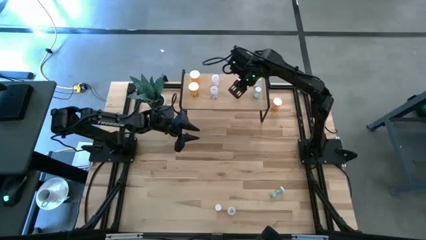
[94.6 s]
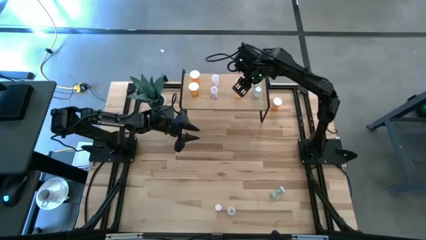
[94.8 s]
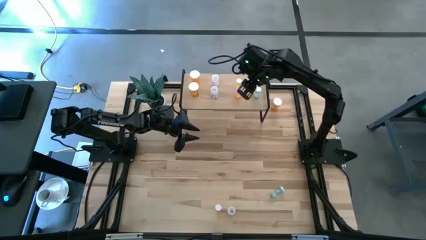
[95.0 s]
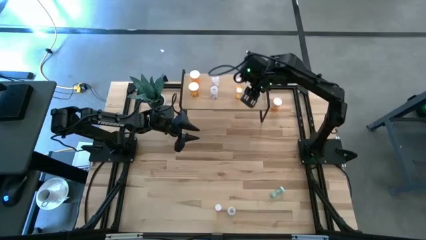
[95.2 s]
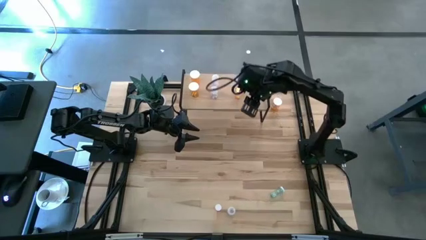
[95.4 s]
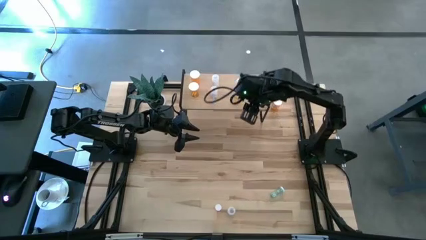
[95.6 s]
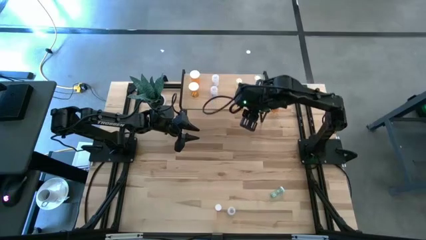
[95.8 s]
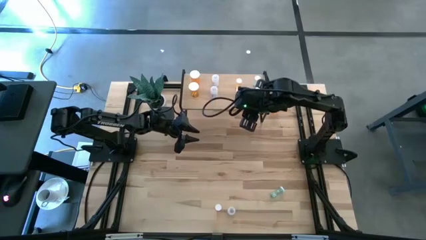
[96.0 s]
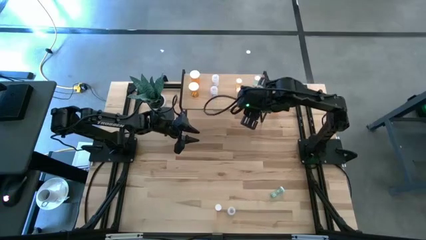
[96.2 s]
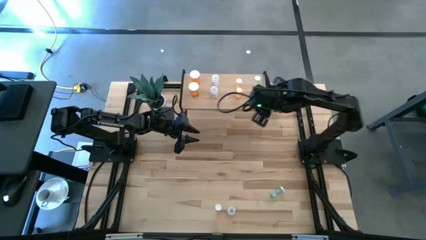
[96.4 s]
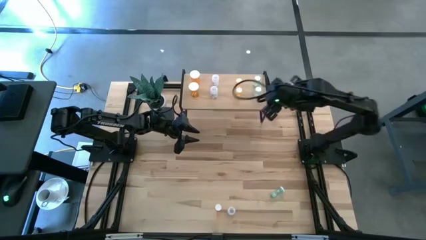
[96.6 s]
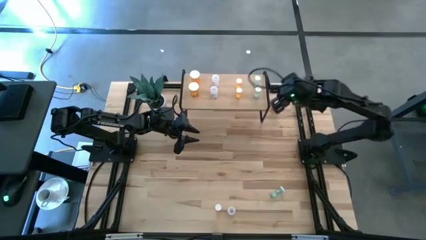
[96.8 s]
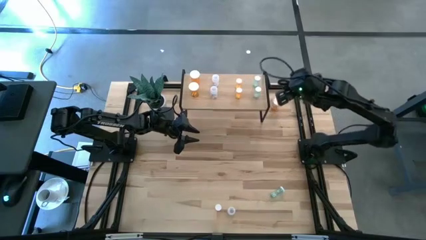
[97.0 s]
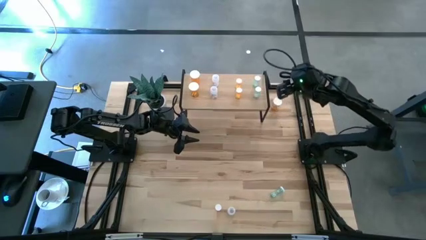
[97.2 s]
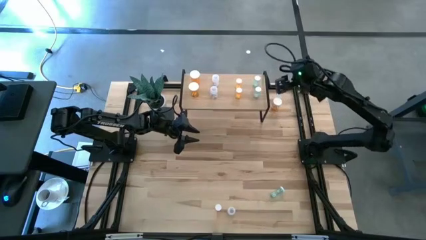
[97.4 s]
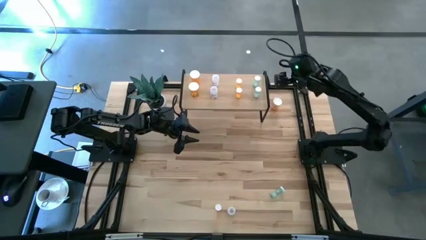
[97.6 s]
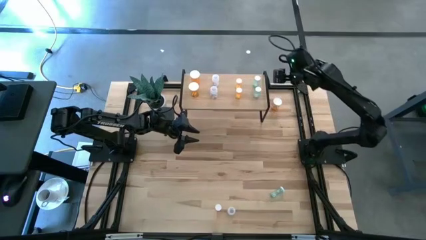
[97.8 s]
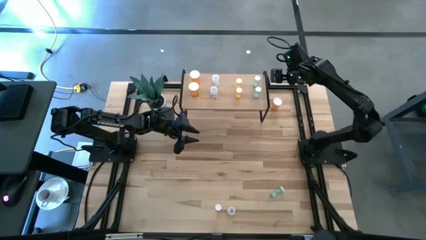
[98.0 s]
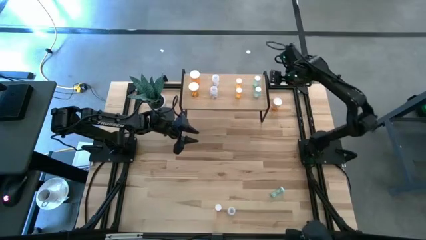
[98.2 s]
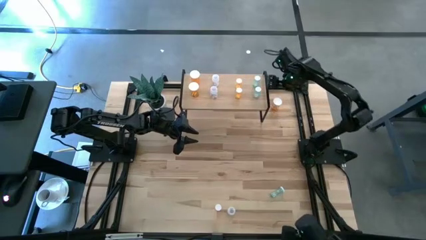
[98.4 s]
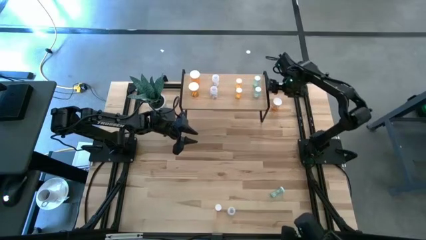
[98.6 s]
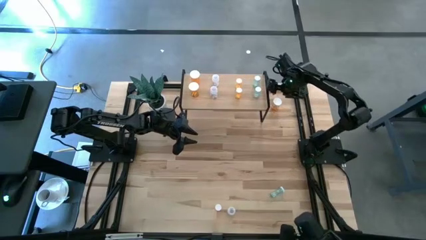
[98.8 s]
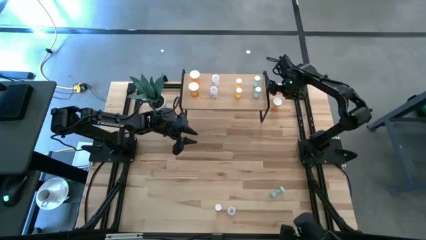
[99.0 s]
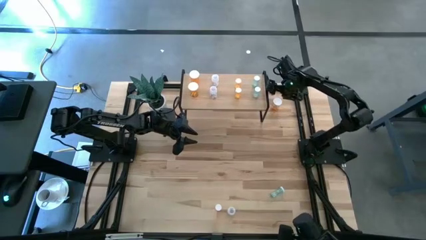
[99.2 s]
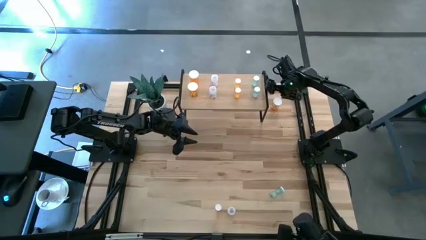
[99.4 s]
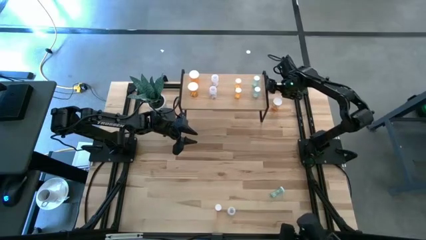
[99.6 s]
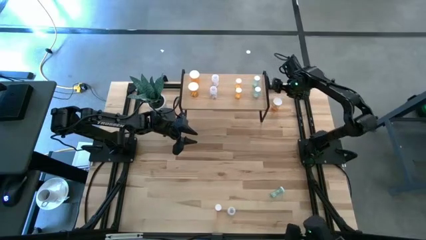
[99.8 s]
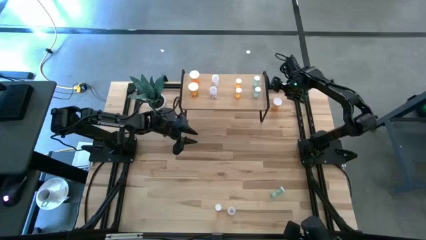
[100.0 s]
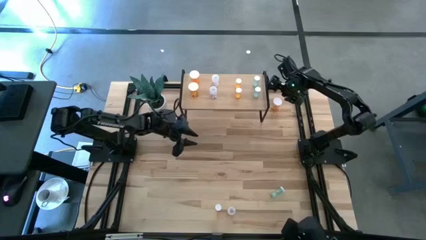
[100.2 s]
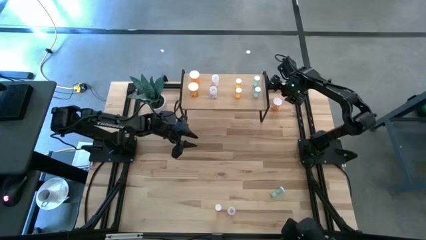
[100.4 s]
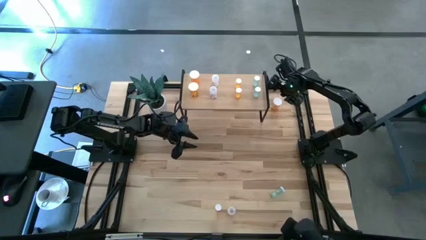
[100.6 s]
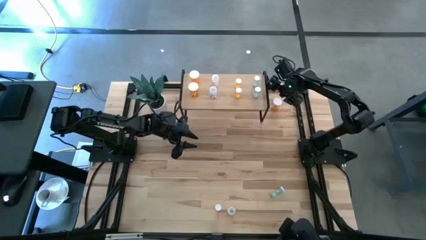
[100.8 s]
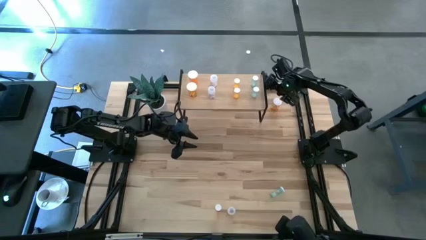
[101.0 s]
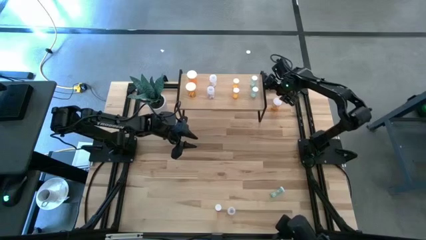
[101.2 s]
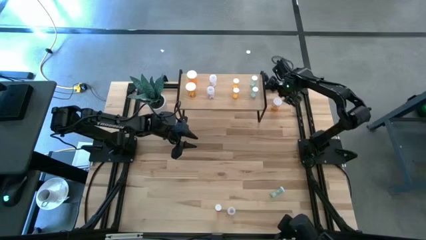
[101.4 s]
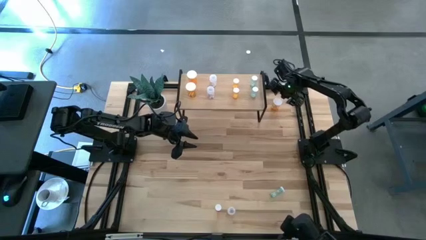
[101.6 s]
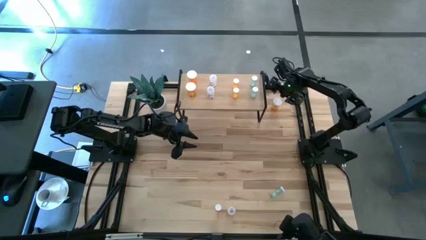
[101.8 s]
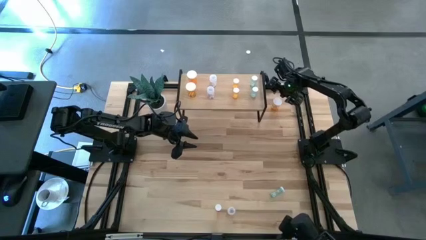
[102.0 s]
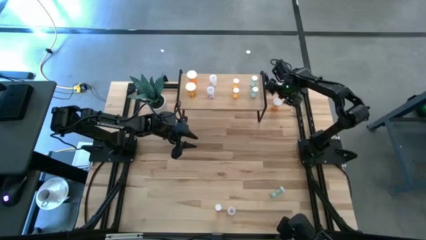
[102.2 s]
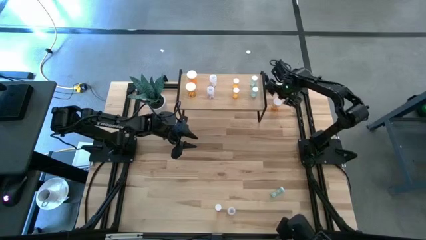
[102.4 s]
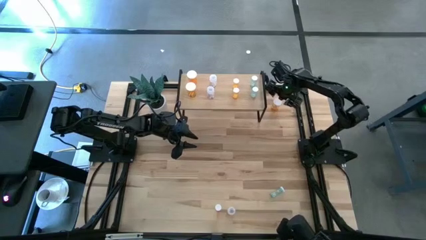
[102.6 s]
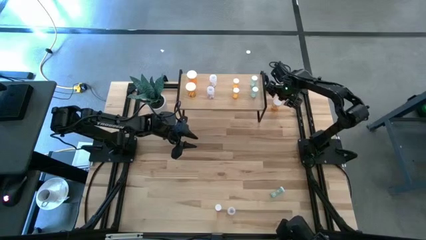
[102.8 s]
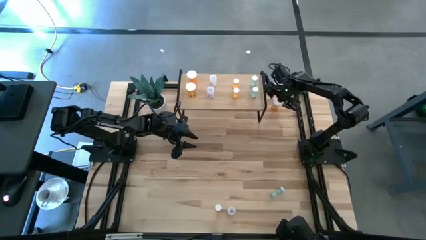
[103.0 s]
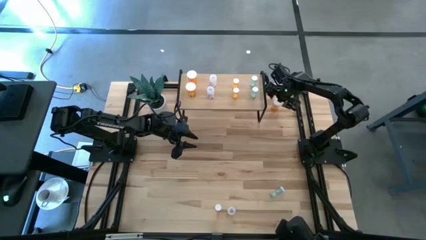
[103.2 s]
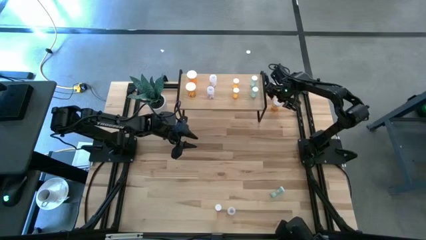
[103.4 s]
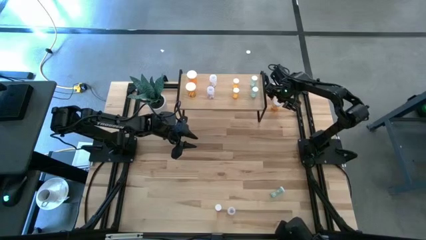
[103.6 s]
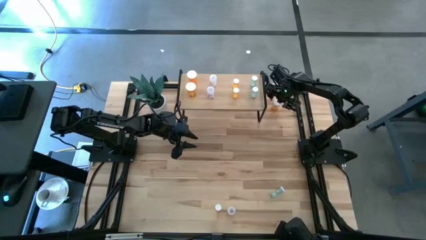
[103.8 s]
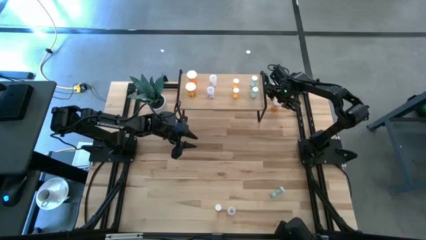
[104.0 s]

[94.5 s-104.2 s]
Task: Pick and place medicine bottles onto shelf by color
Put the large orange pill bottle aligned with the other large orange pill bottles on the shelf

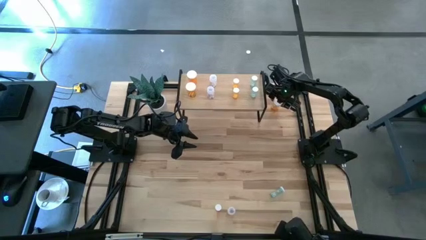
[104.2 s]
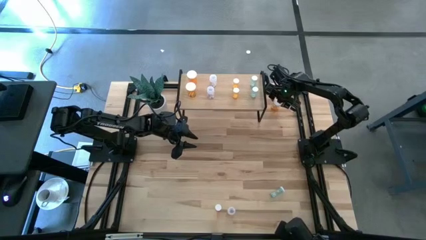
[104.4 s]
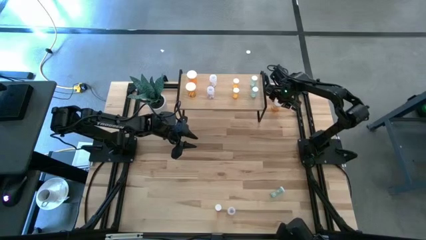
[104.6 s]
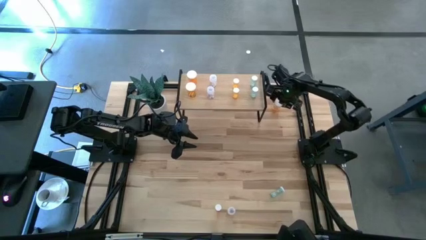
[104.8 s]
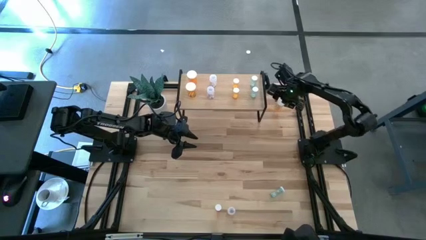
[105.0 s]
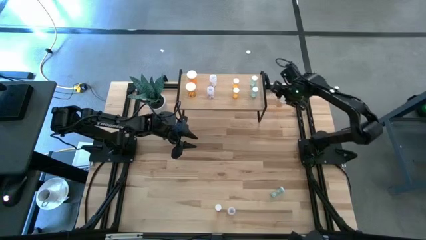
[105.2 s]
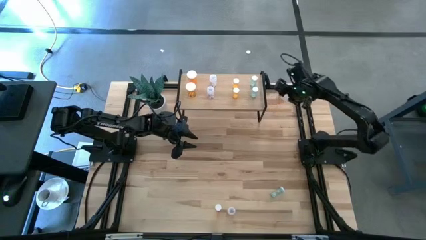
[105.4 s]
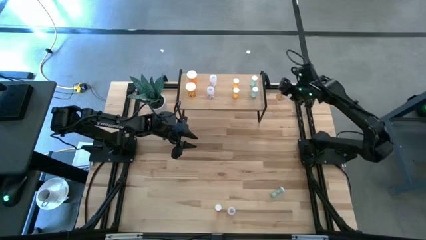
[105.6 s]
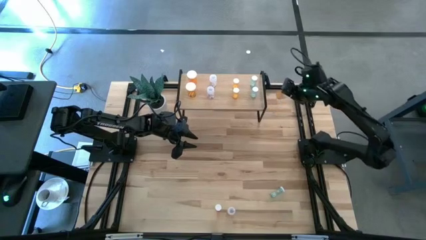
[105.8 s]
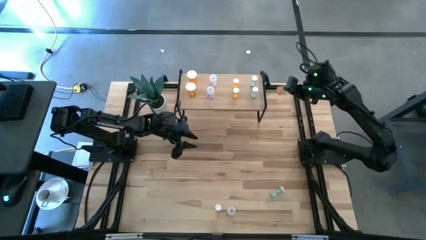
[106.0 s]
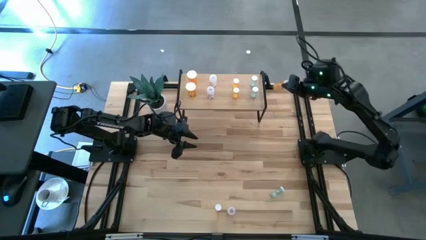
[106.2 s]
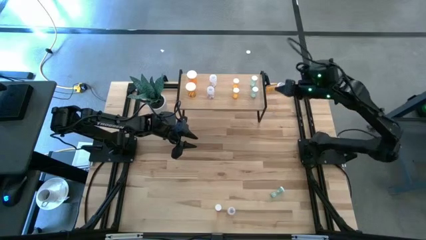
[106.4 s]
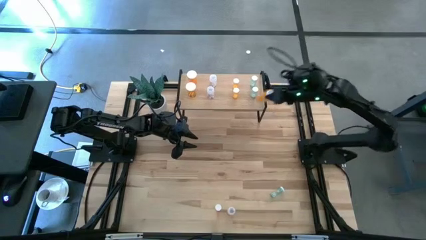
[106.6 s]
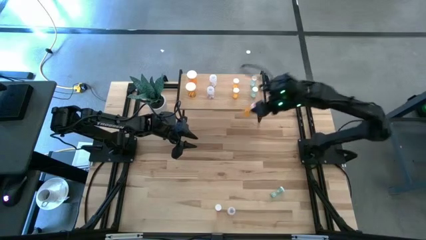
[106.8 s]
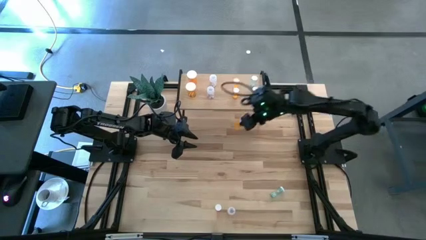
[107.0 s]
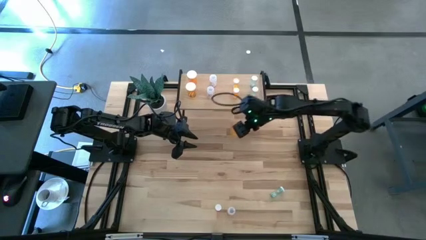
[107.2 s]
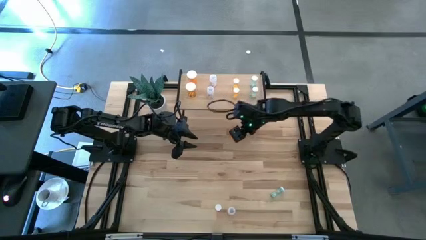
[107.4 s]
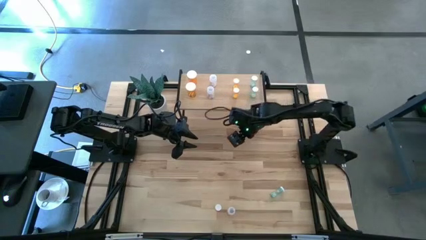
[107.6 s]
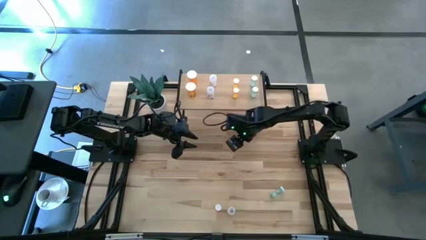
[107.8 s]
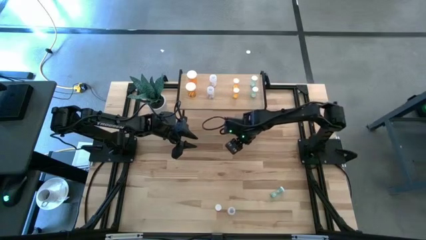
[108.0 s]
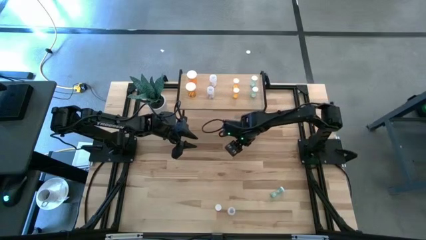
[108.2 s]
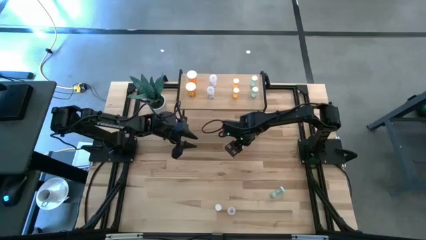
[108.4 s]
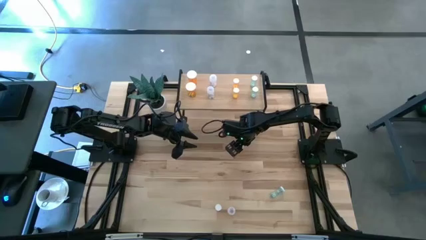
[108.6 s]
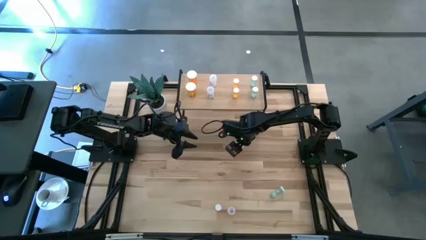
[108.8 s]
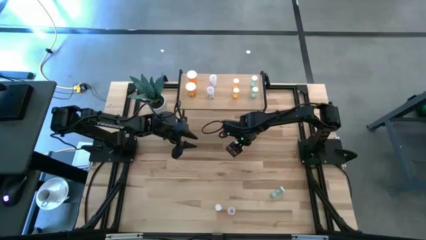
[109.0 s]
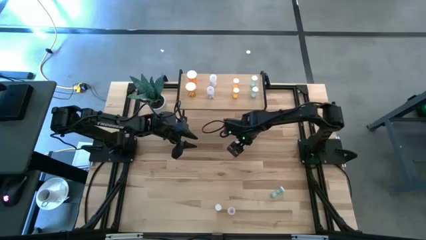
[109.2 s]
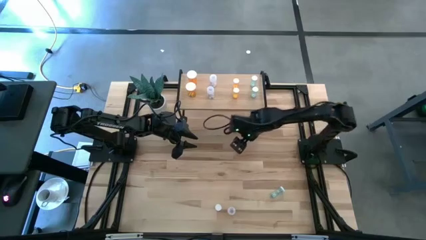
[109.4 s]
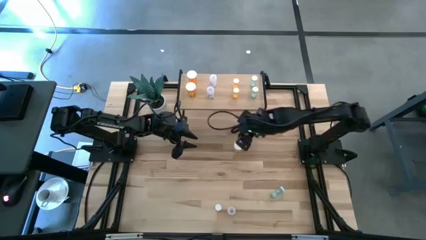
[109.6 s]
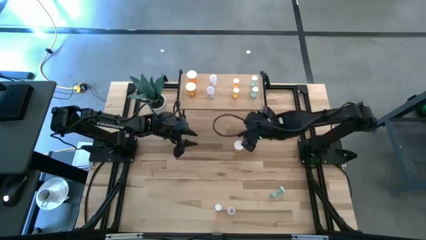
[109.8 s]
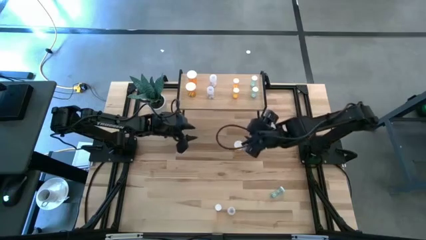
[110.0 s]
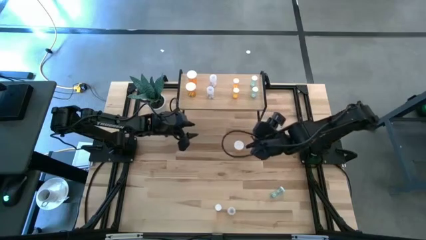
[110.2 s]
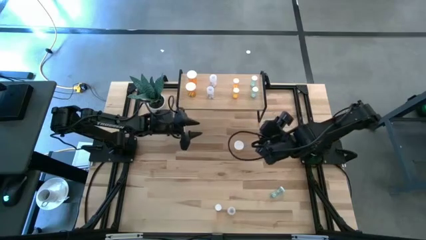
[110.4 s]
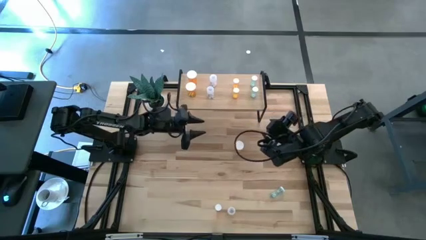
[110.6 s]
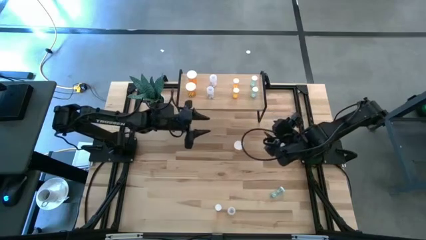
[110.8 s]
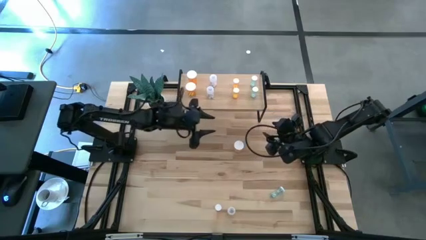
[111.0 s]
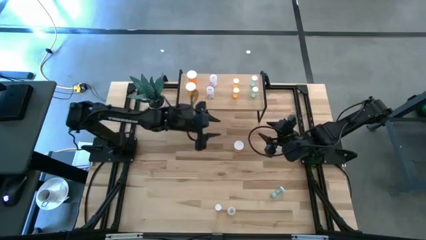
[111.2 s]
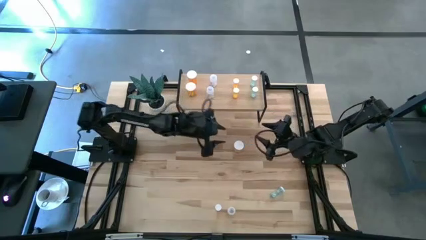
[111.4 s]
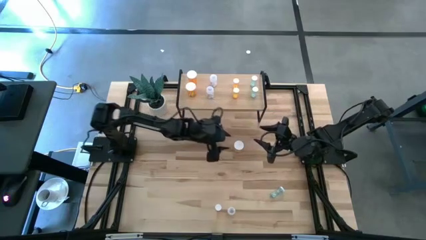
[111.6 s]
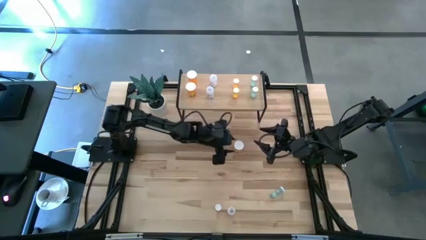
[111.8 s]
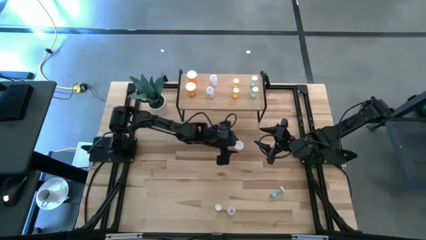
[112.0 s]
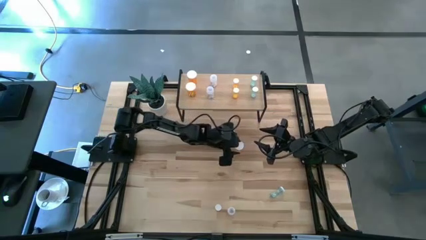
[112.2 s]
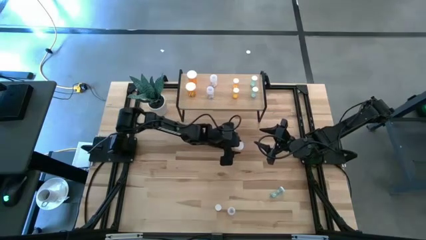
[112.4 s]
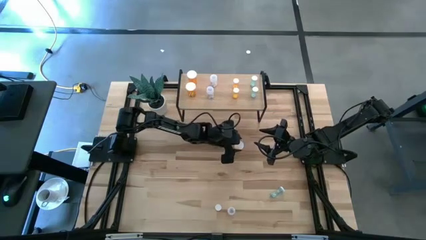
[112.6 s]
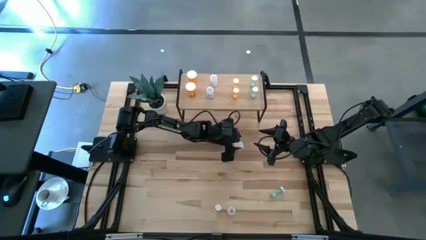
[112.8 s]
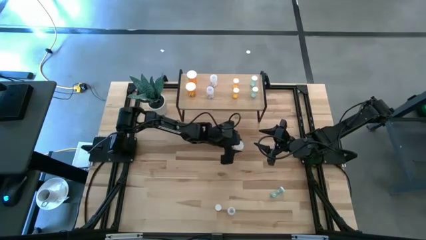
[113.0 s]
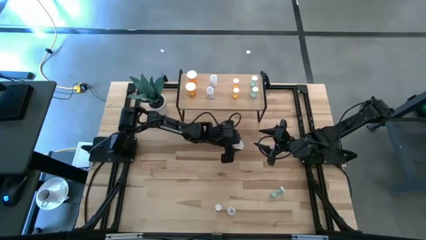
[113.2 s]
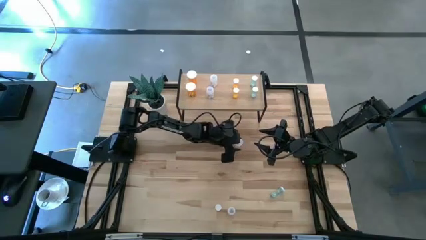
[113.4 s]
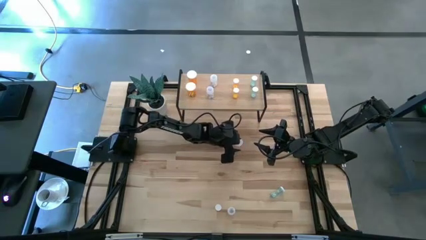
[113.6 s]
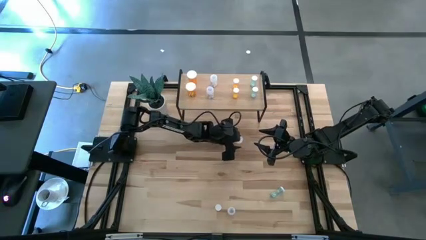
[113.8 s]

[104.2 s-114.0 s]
Put the large orange pill bottle aligned with the other large orange pill bottles on the shelf
